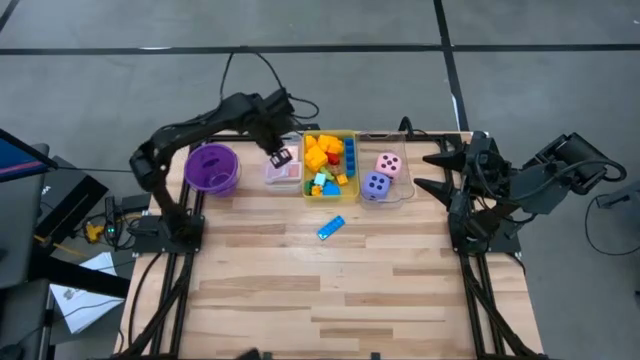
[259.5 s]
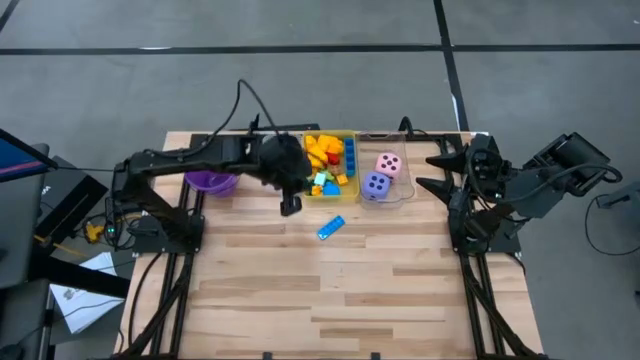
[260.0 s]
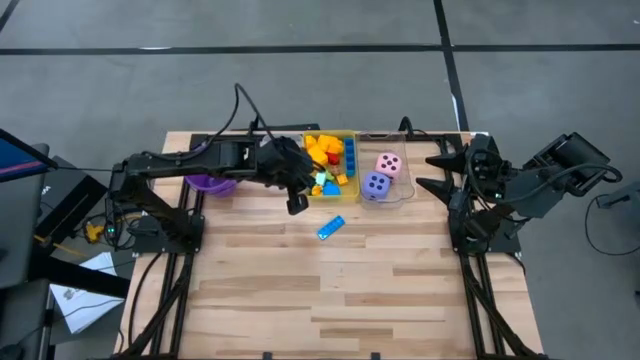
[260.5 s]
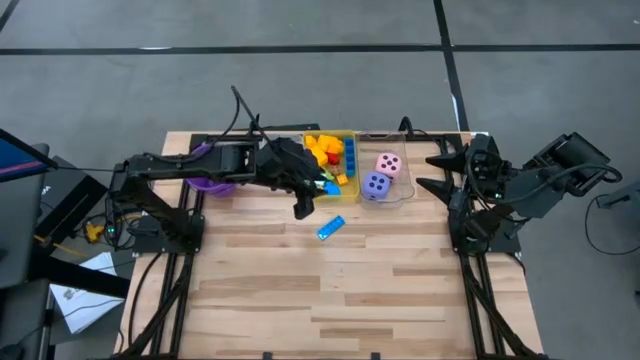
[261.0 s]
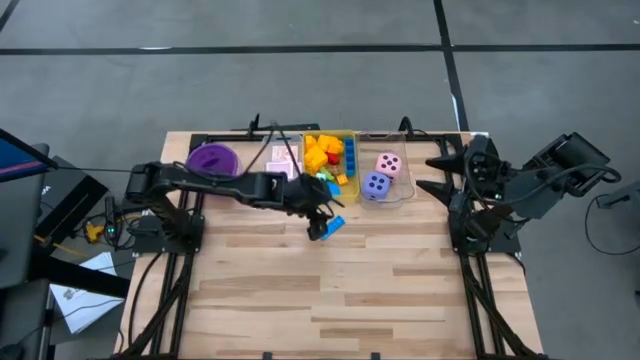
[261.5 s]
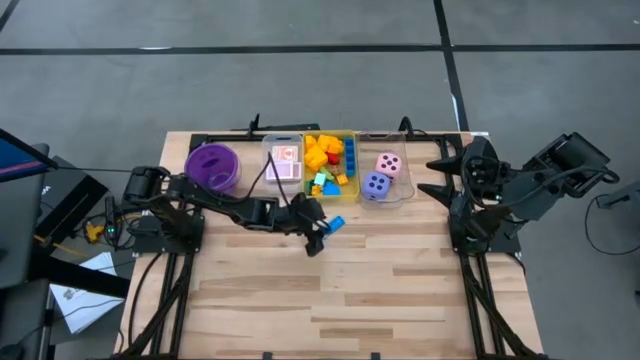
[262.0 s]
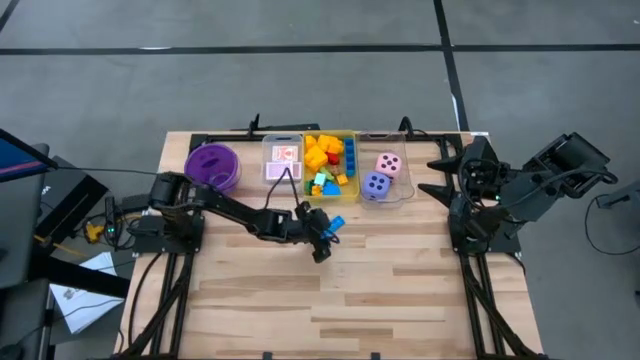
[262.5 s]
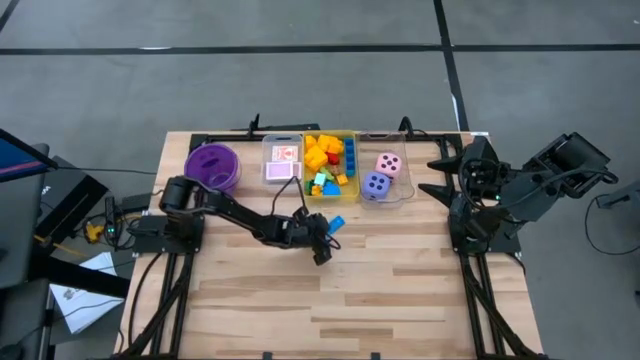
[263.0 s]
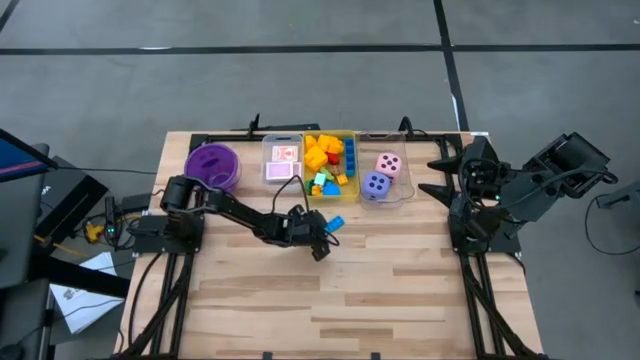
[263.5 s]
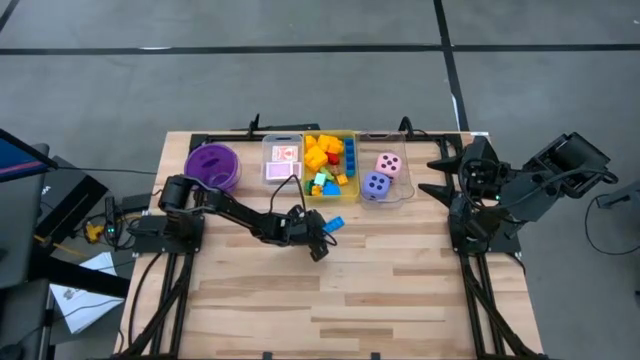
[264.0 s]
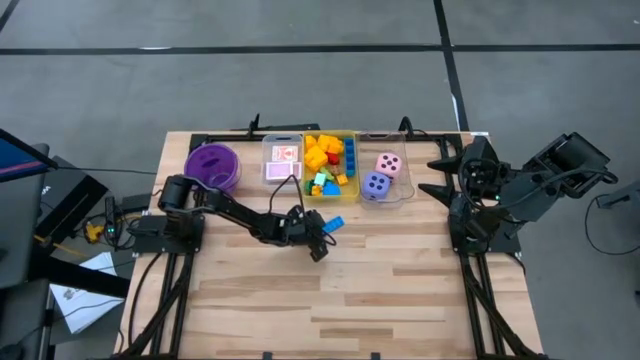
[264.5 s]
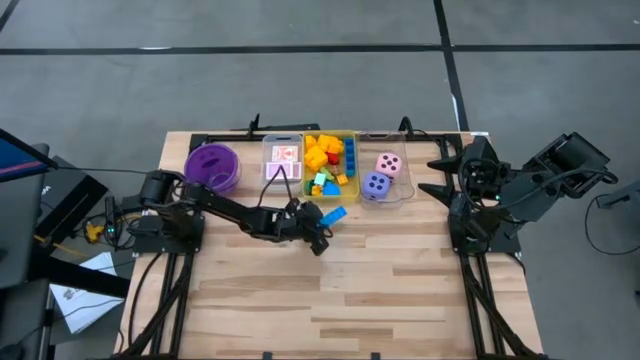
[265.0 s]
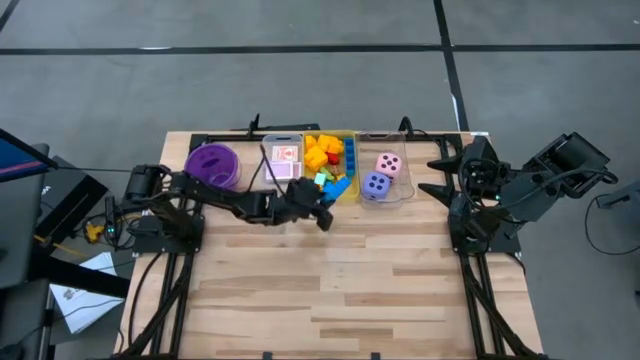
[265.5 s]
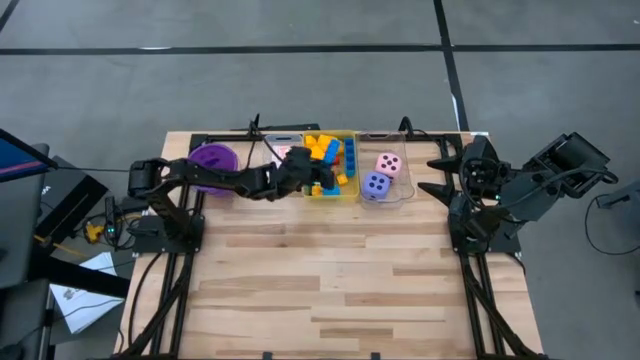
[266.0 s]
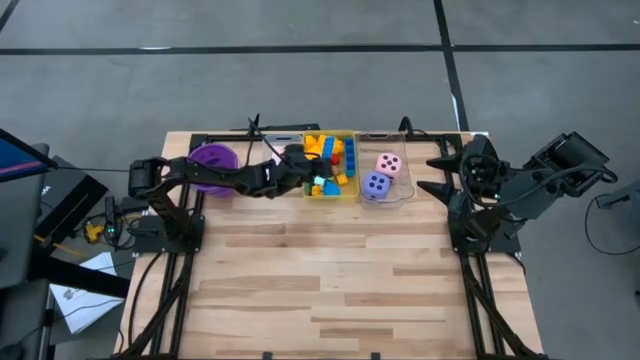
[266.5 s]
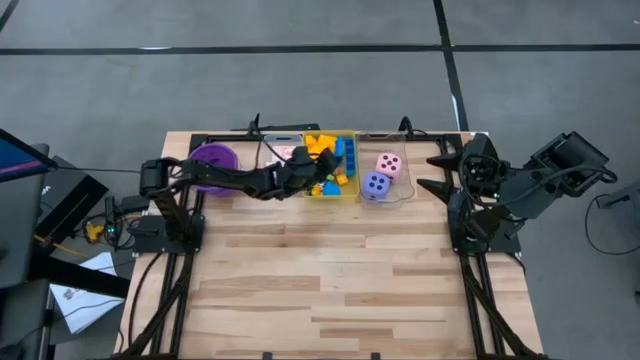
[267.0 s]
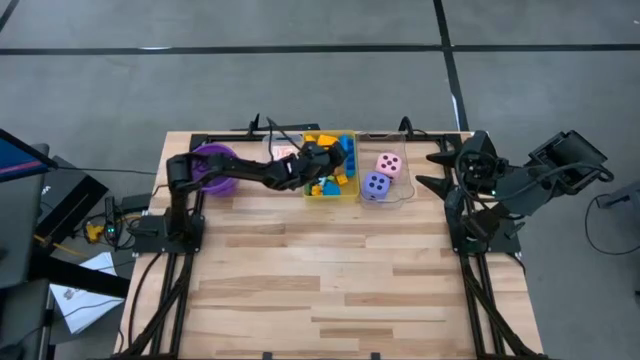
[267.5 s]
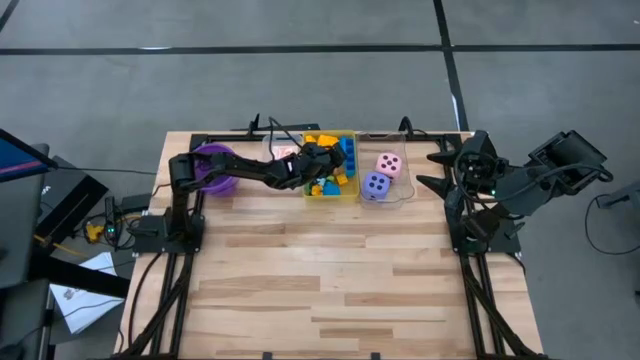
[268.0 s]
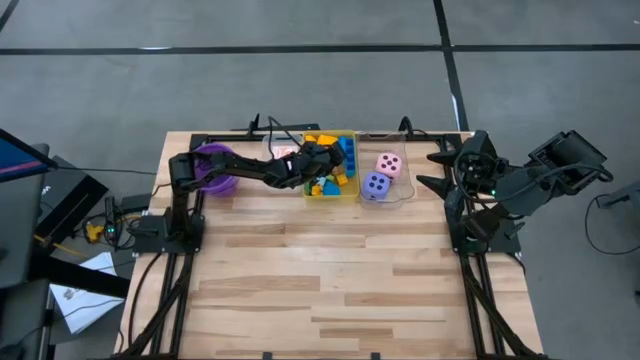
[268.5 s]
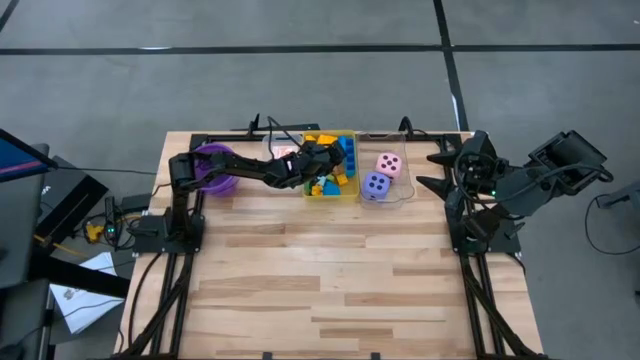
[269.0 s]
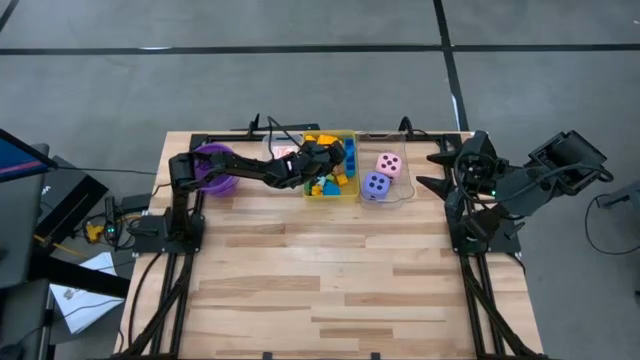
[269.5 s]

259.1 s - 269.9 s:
Task: Pick & Place Toys
Put the blue gamepiece into the yellow bin

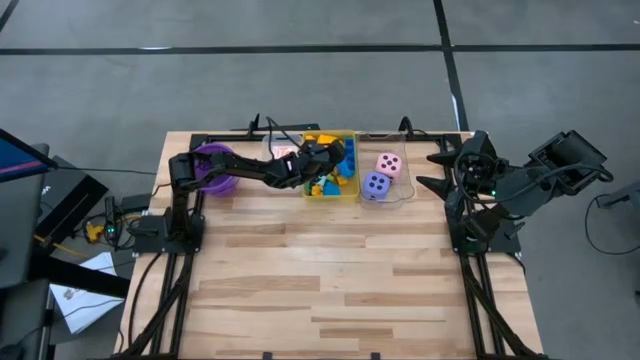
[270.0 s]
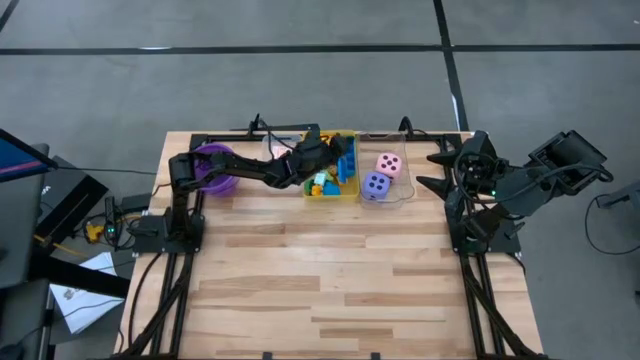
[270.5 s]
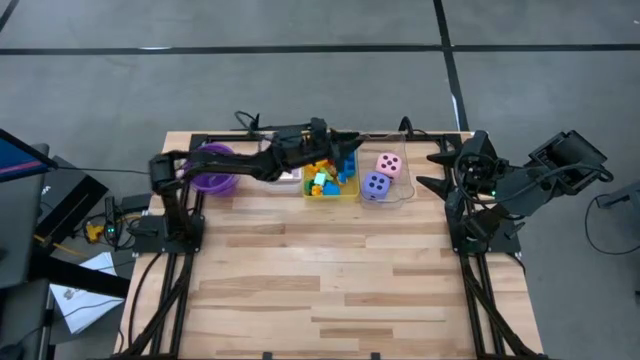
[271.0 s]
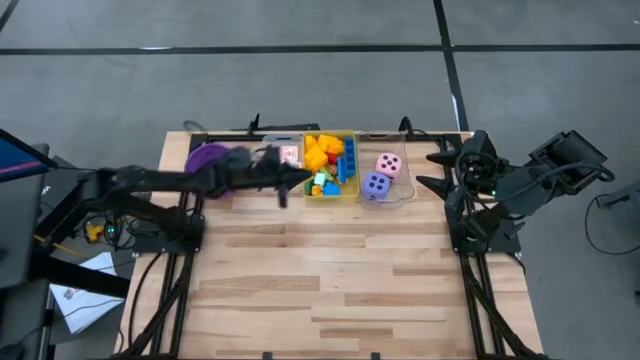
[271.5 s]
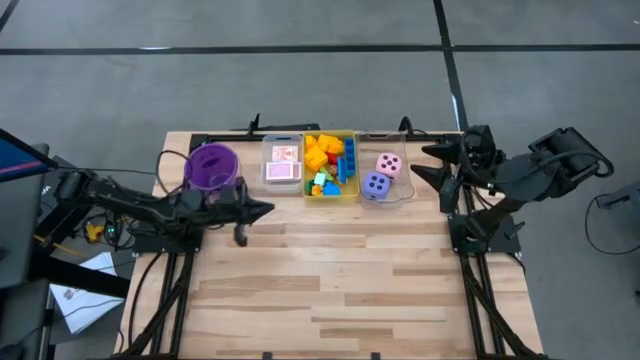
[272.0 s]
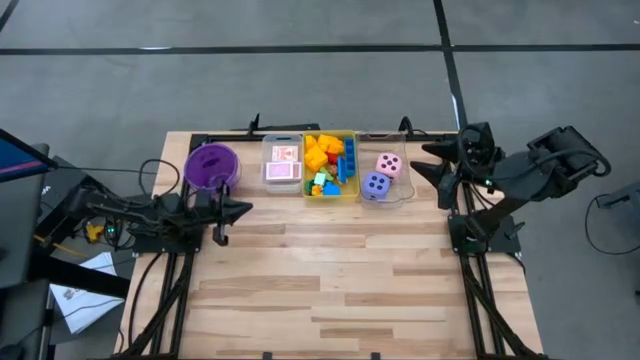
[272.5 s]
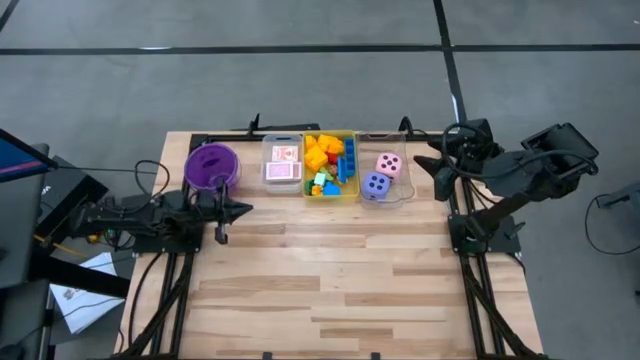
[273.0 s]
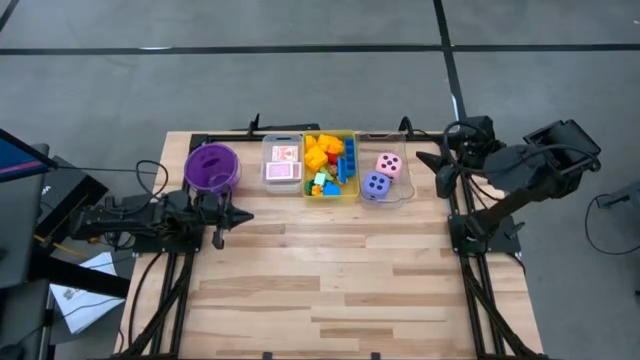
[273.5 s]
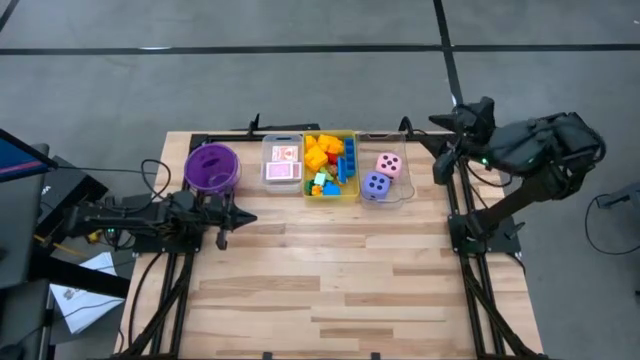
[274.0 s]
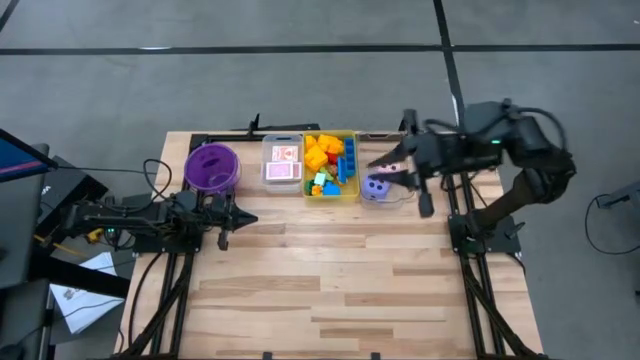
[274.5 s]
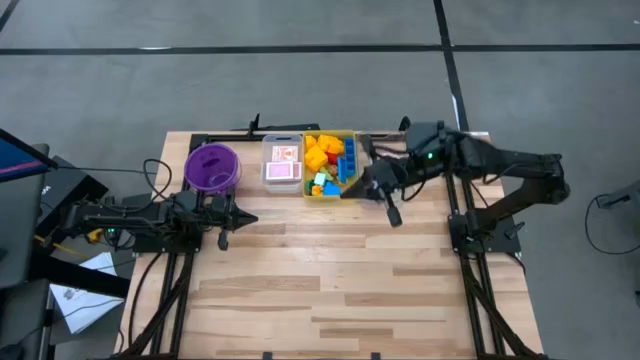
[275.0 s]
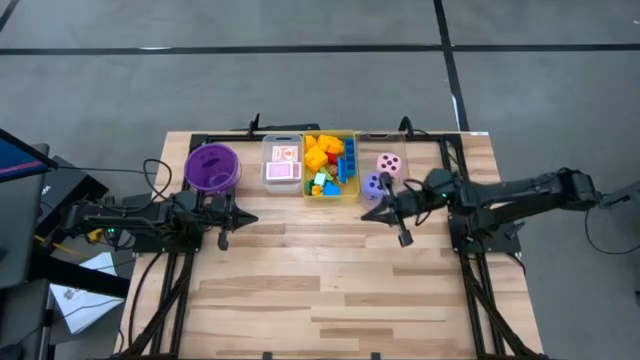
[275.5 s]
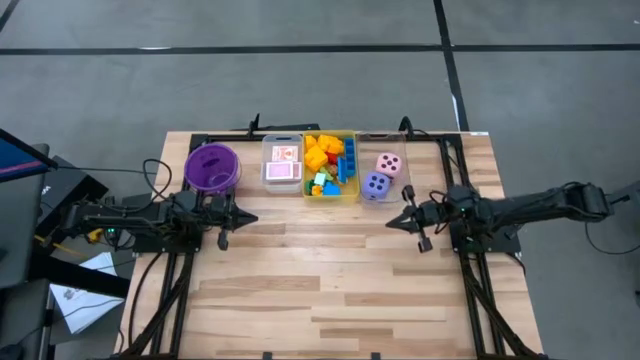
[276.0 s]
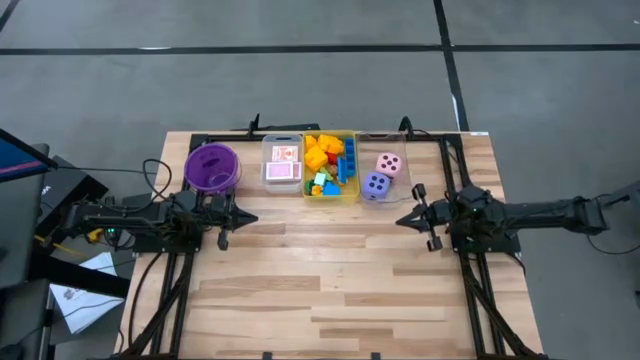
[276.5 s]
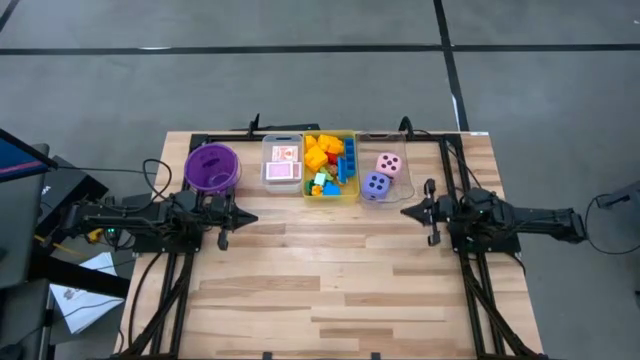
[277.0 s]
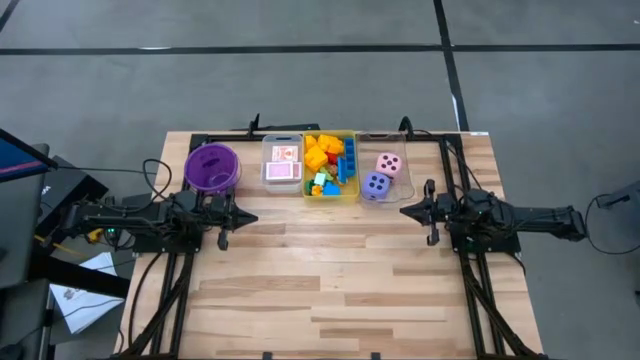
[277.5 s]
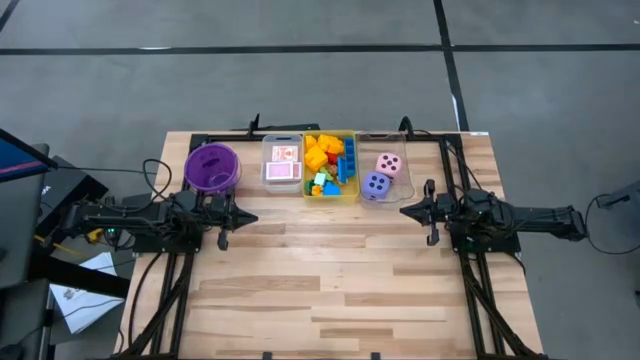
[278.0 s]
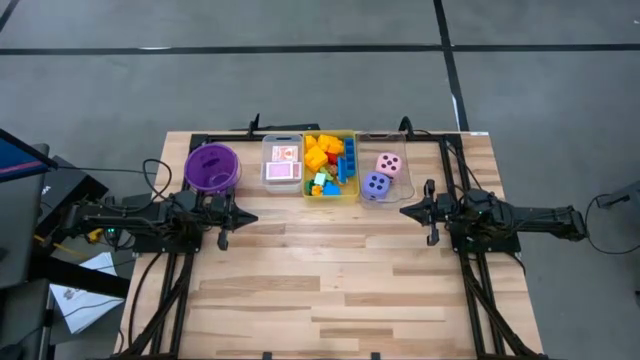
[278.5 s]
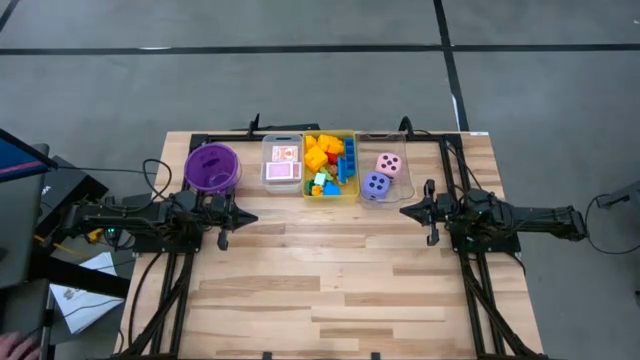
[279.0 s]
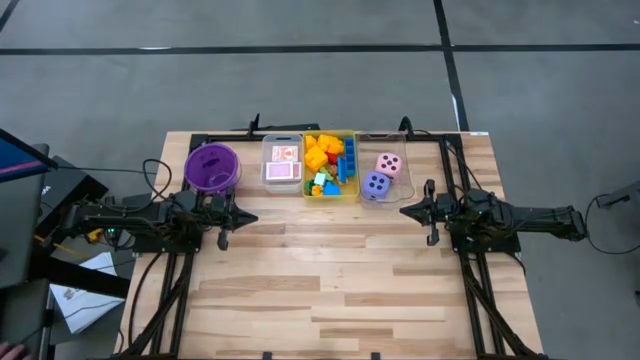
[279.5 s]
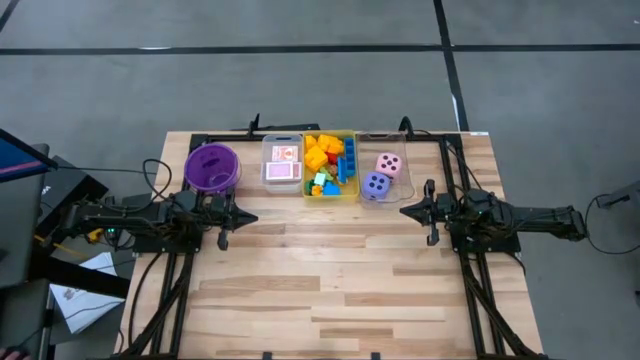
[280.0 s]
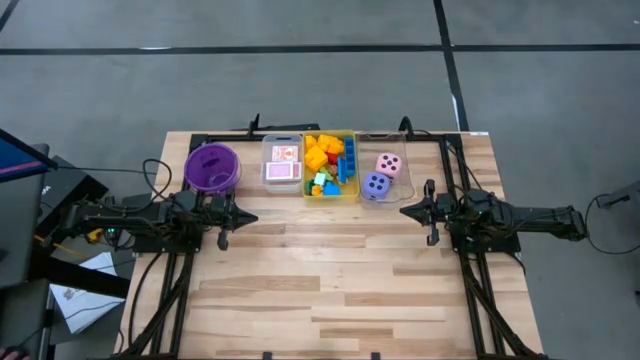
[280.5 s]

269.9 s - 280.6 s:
Return to Home Position
